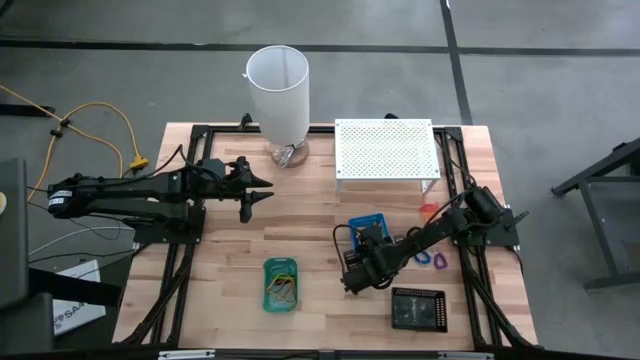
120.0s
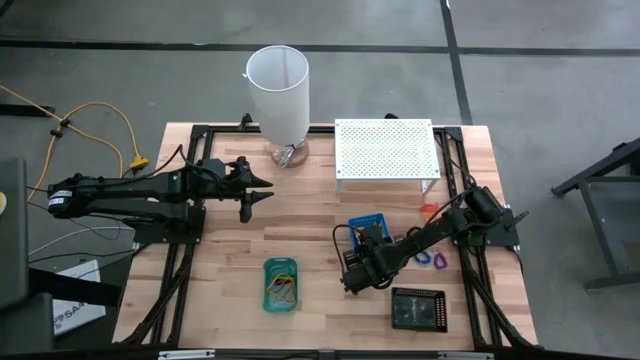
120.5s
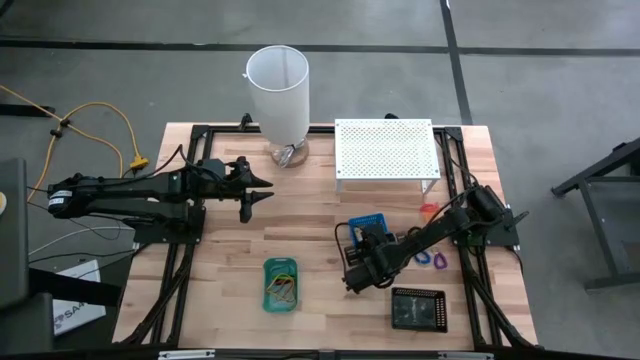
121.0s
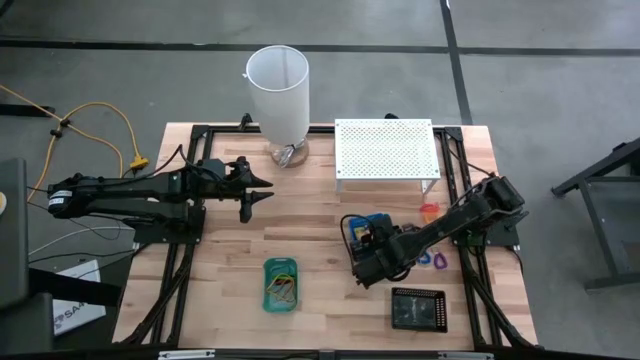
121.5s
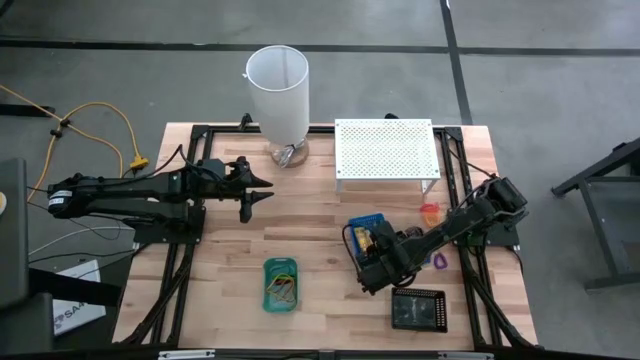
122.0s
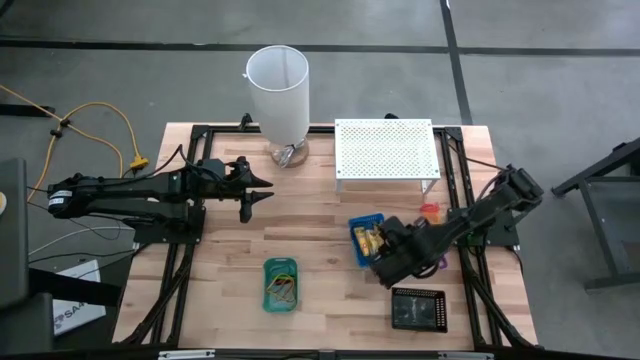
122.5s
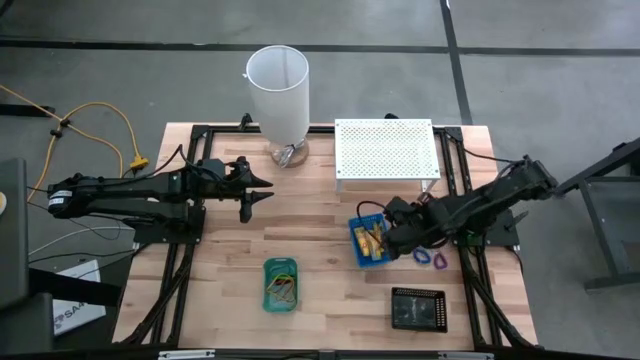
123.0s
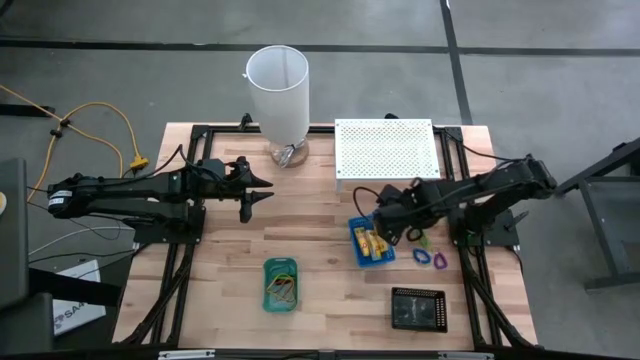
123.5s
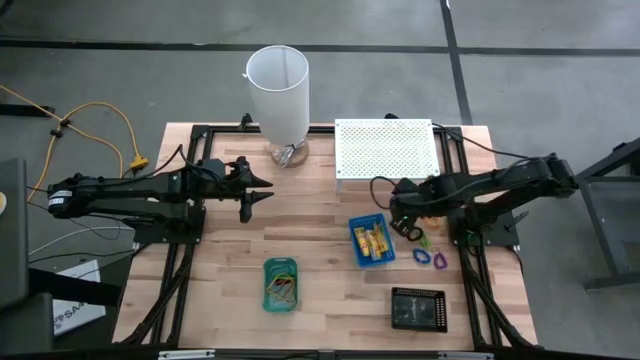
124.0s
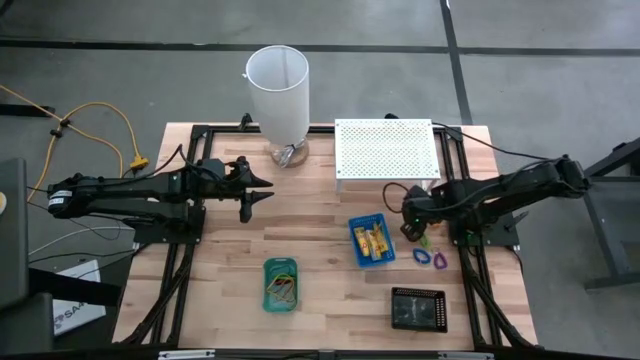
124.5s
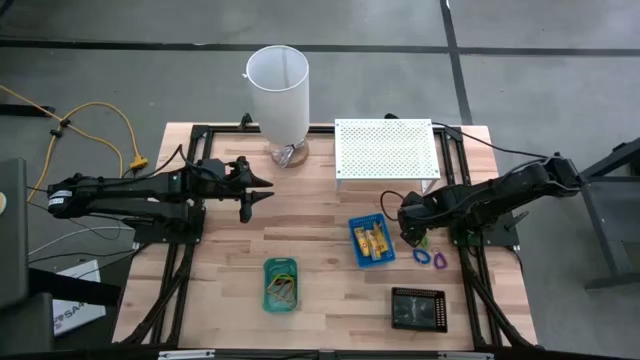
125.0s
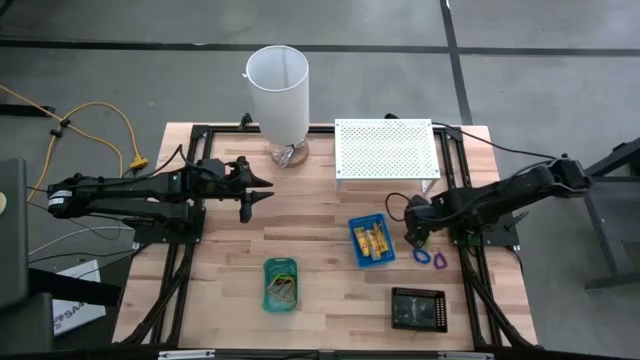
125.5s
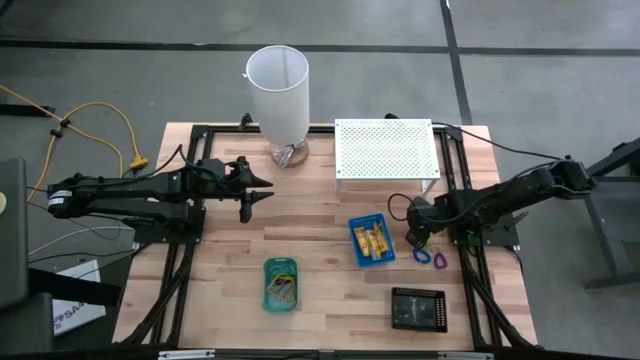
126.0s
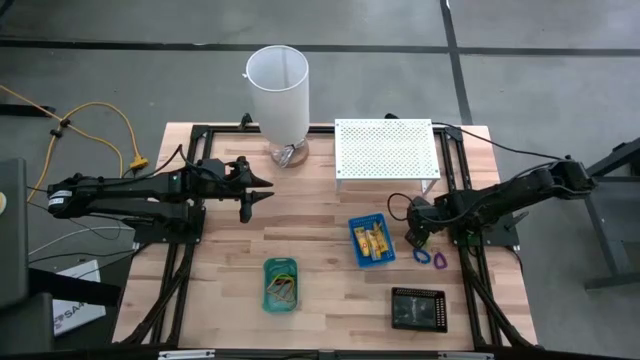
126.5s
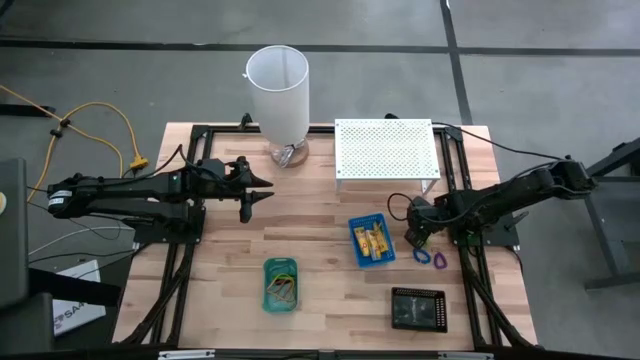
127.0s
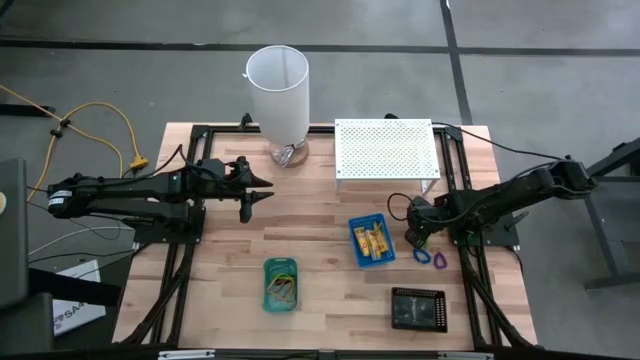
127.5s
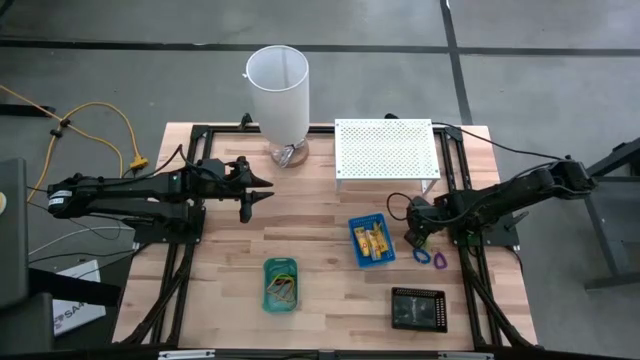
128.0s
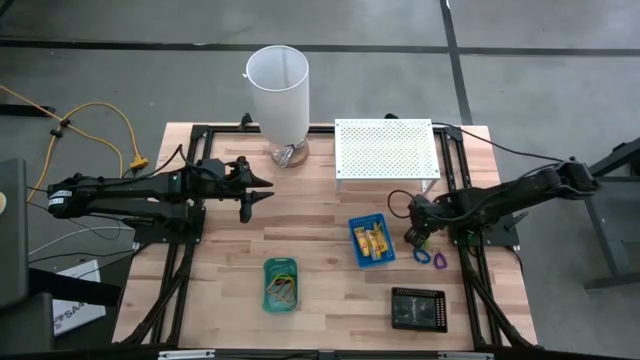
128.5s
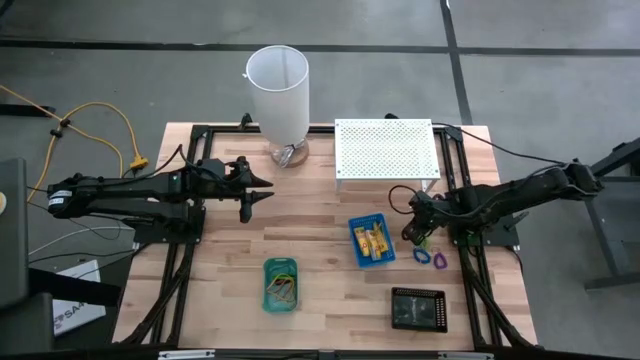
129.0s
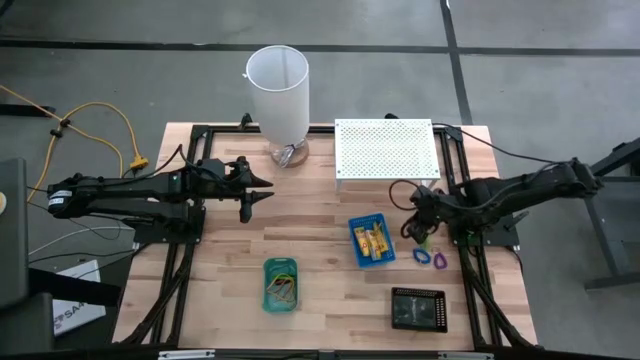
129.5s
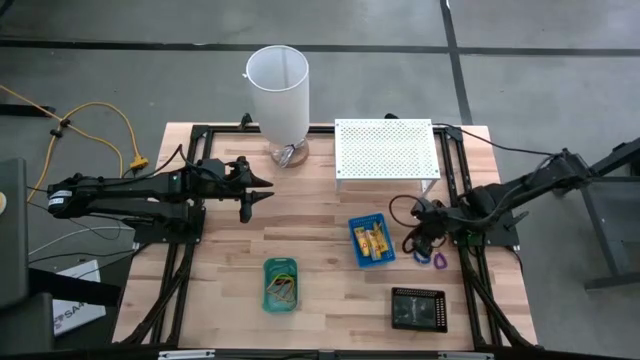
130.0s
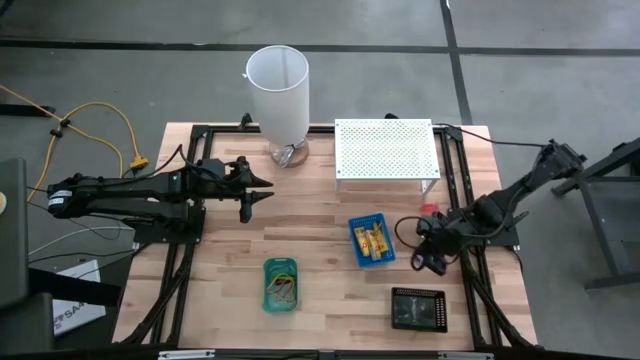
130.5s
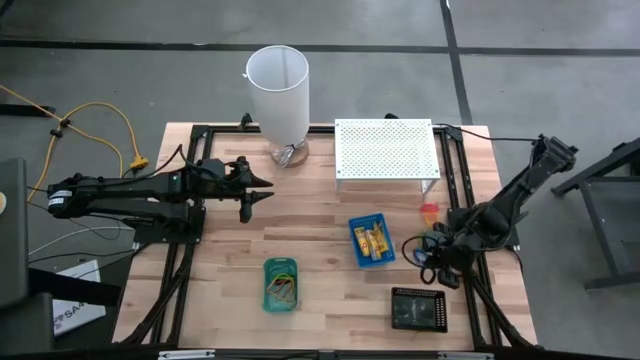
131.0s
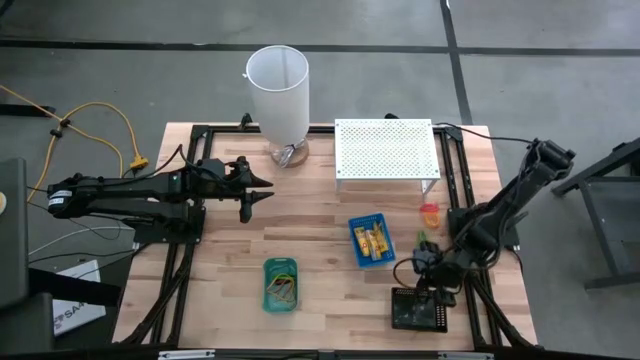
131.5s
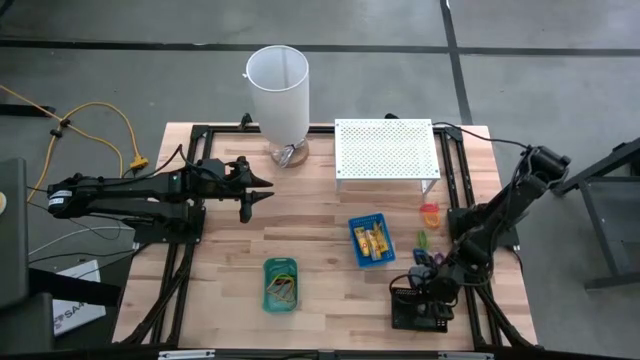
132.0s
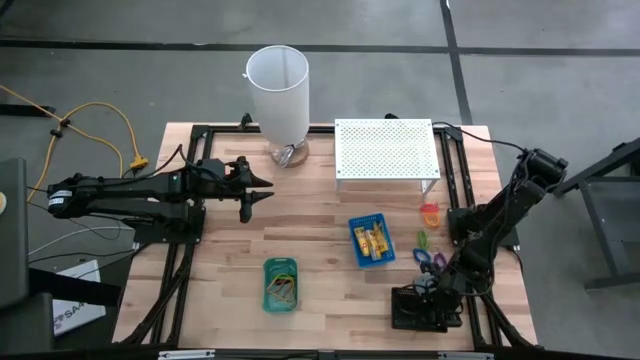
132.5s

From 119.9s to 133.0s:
Task: Pick & Place Office Desk Supplies
Put the black spring rubber band into the black bin

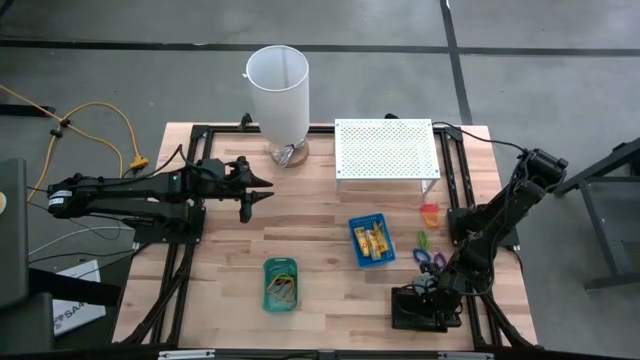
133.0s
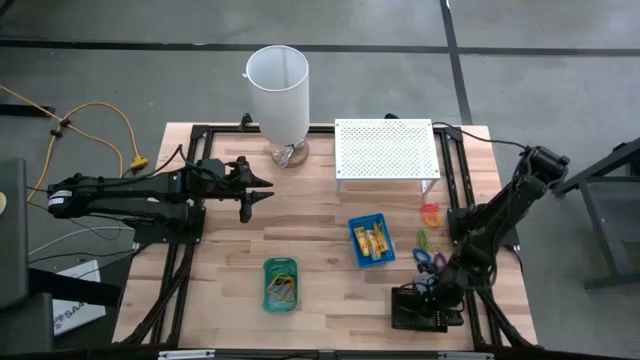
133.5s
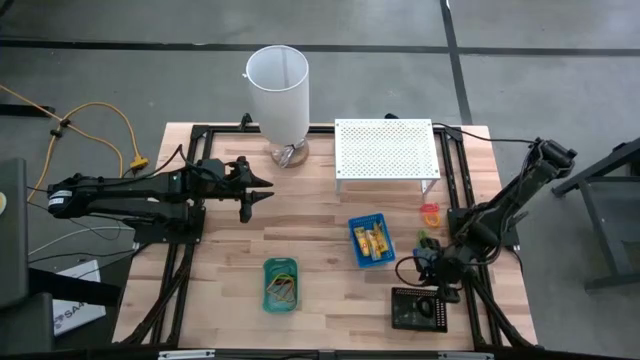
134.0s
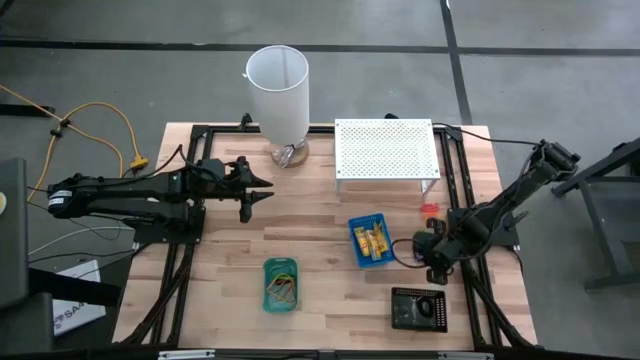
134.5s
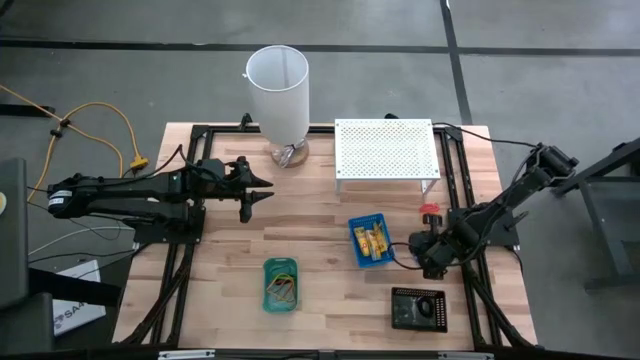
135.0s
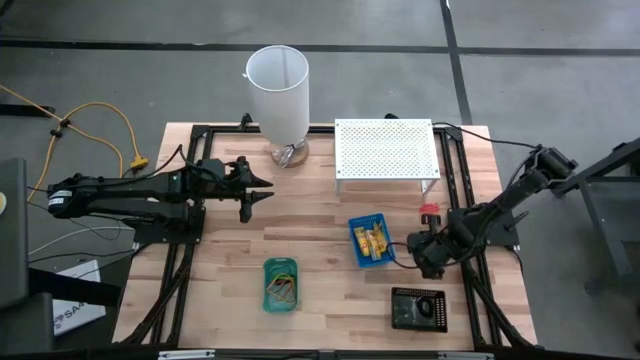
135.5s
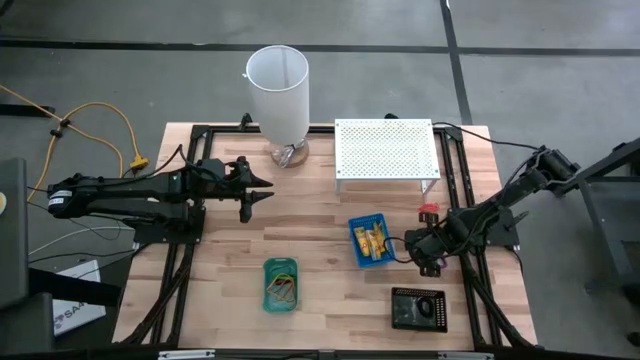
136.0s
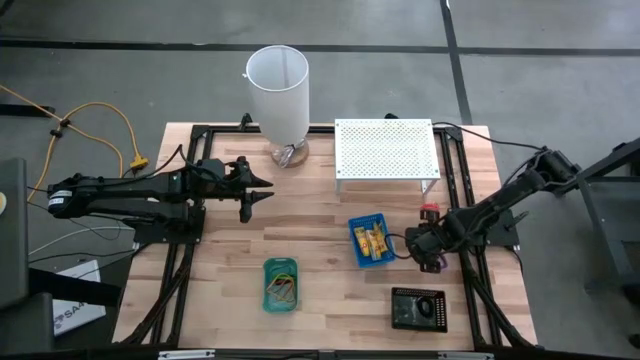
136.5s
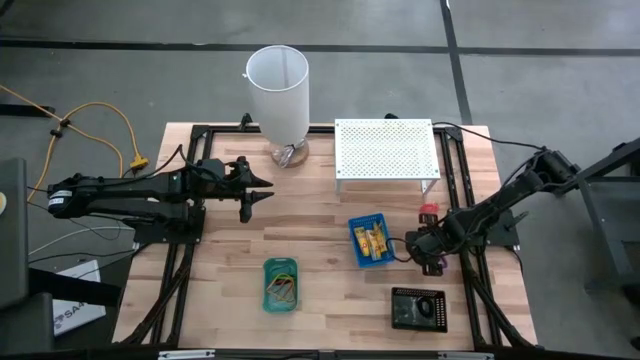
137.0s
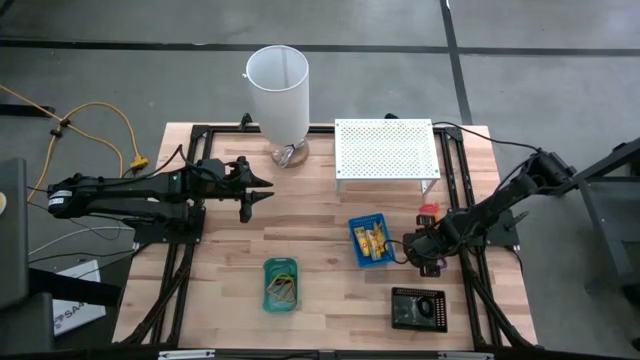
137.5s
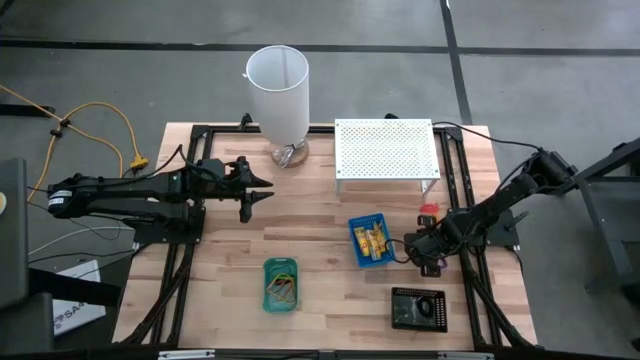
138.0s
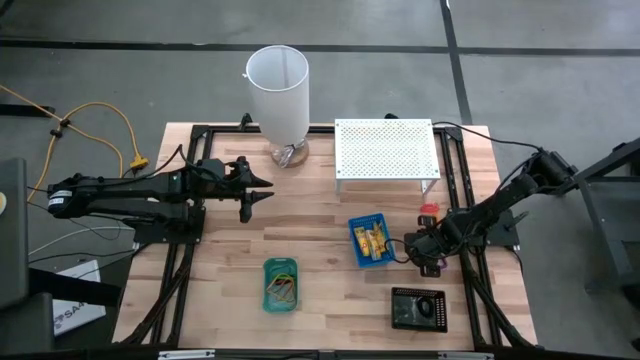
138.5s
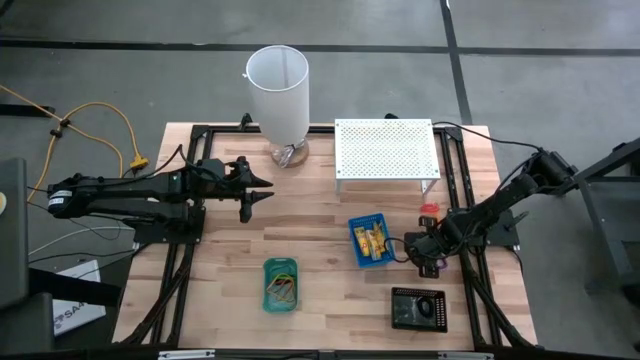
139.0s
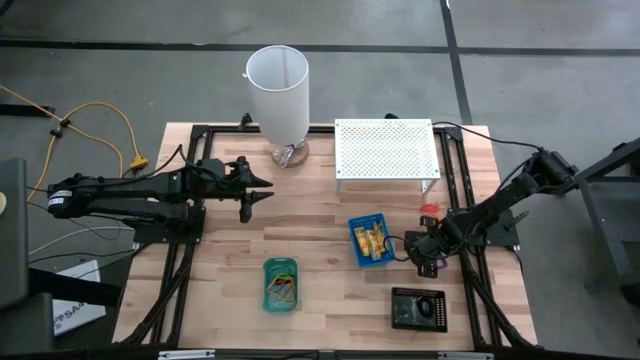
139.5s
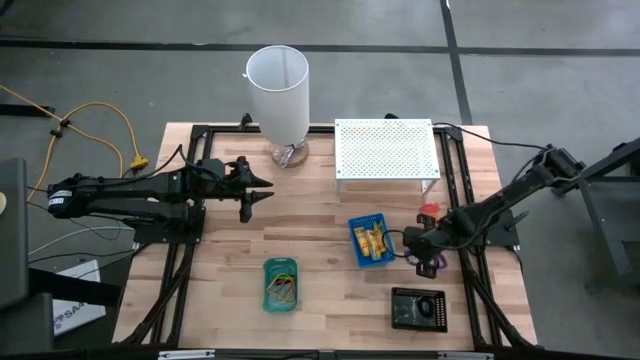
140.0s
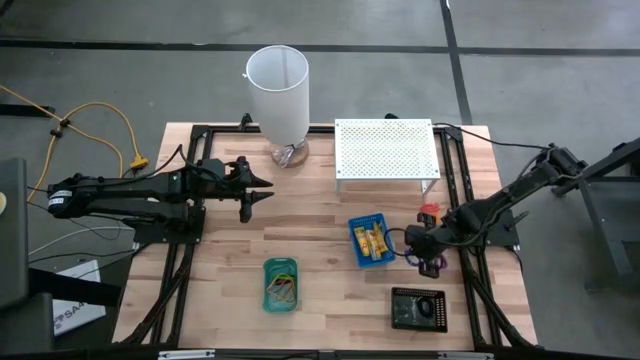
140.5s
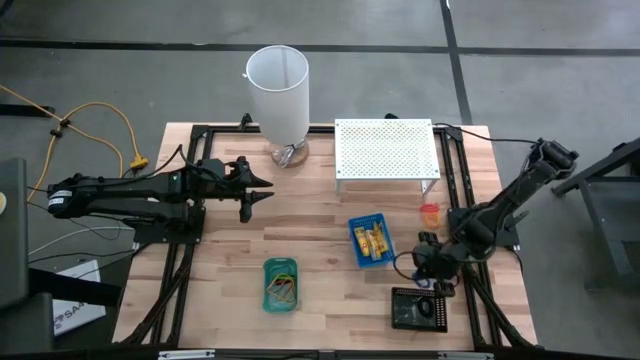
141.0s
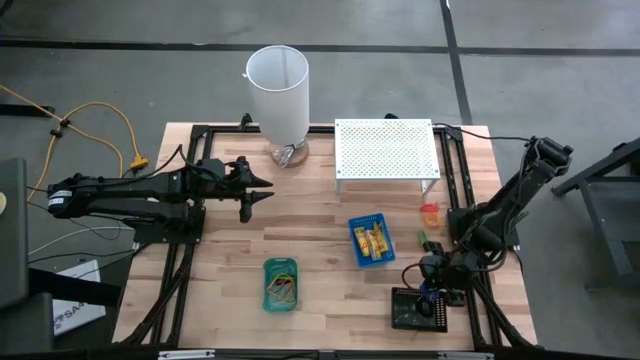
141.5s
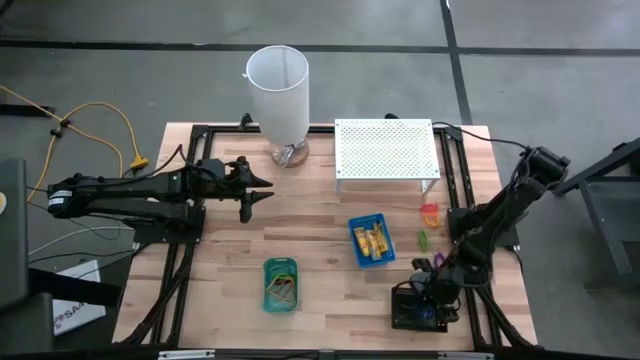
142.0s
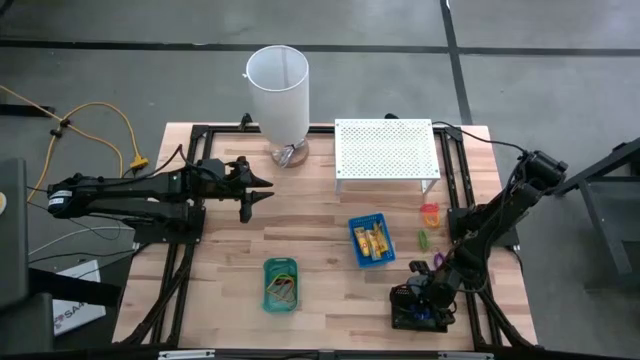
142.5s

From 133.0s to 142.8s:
Put the blue spring rubber band into the black bin
